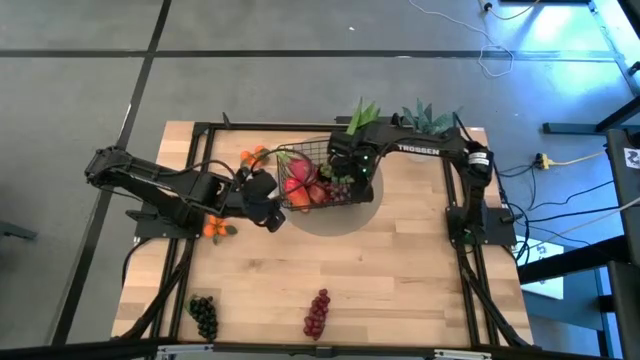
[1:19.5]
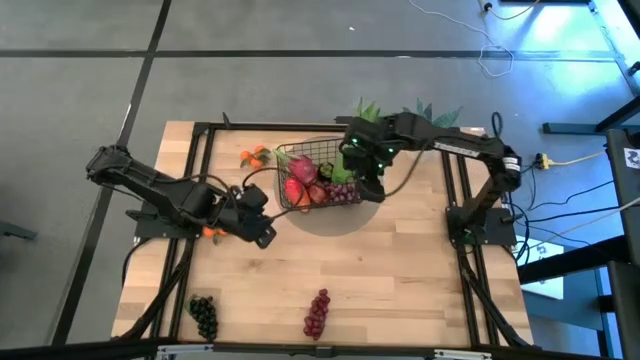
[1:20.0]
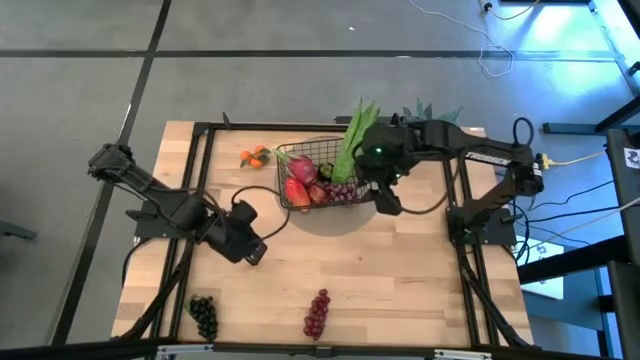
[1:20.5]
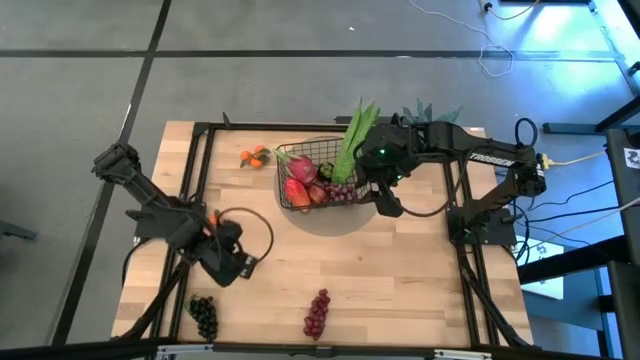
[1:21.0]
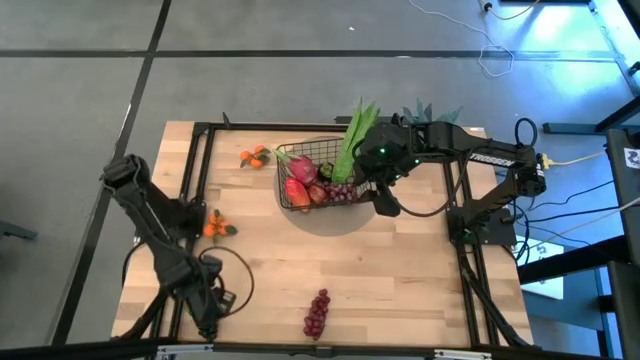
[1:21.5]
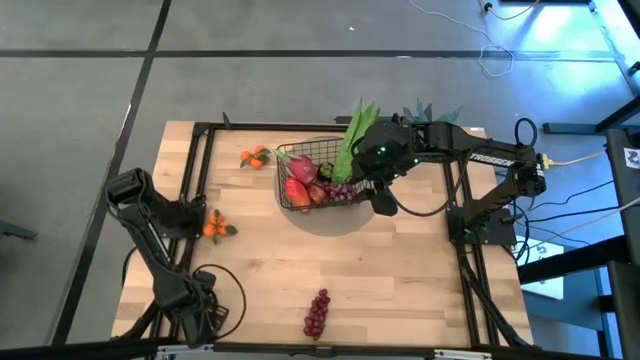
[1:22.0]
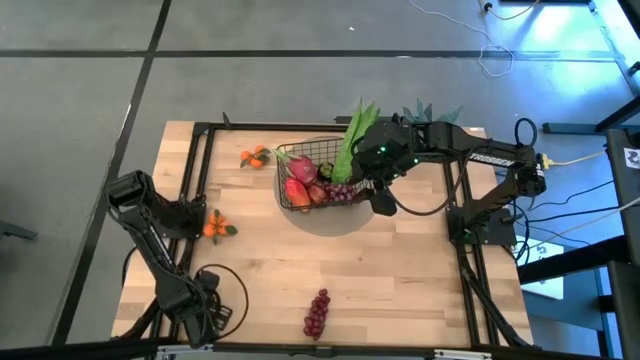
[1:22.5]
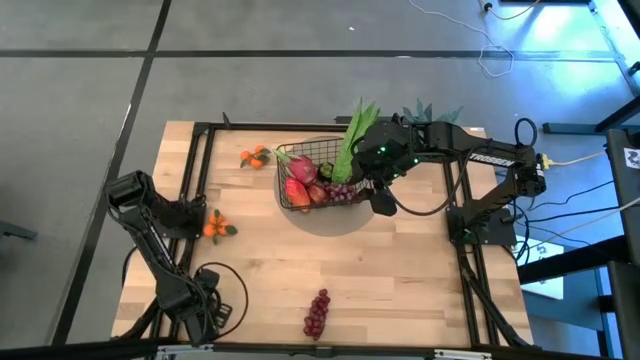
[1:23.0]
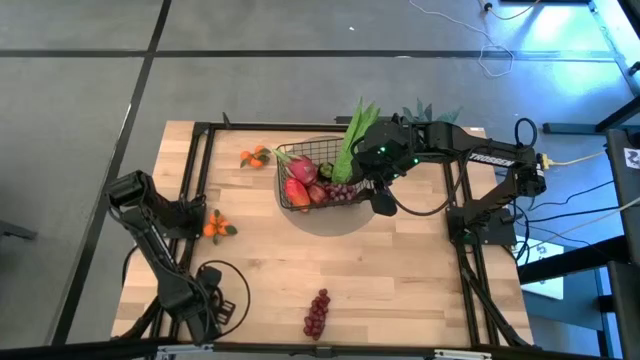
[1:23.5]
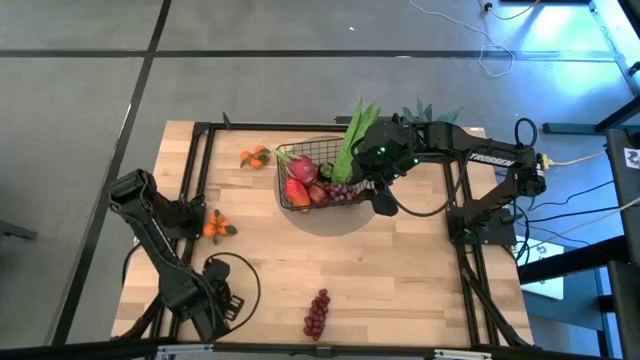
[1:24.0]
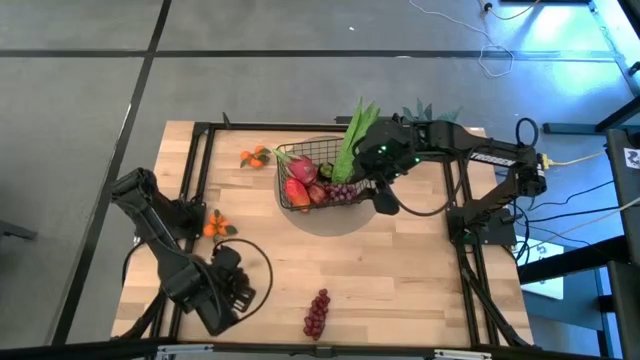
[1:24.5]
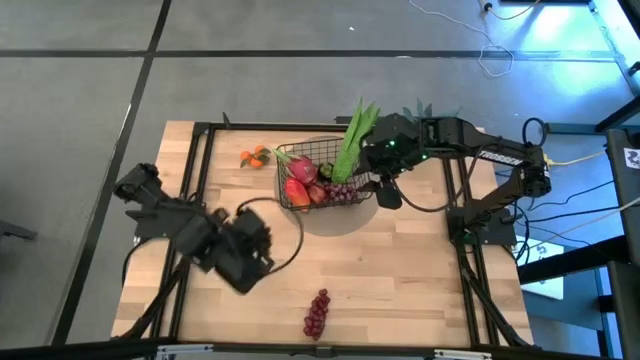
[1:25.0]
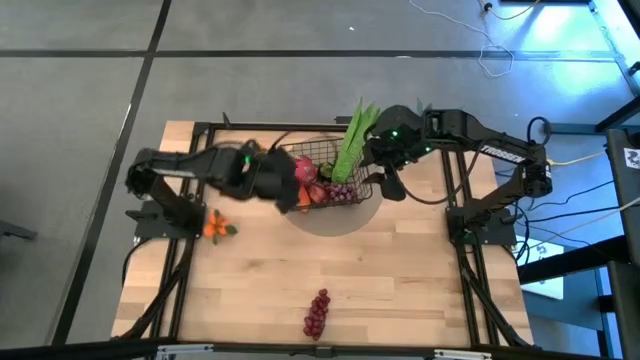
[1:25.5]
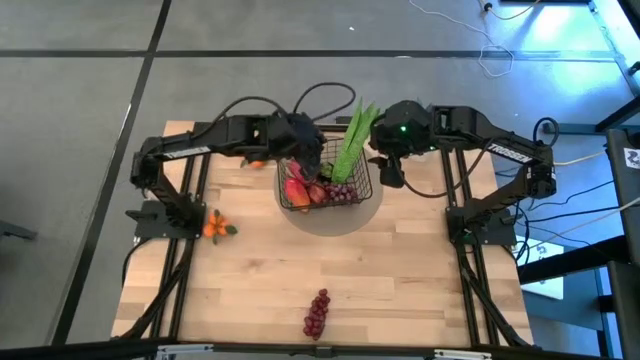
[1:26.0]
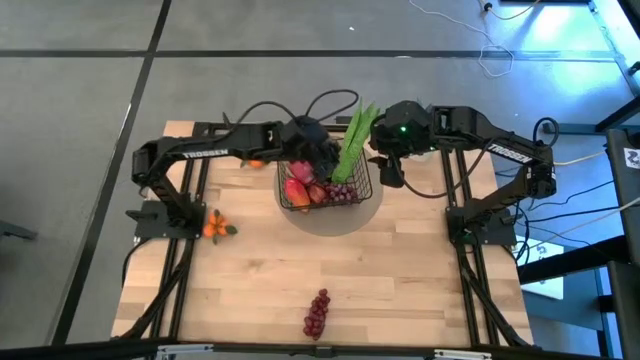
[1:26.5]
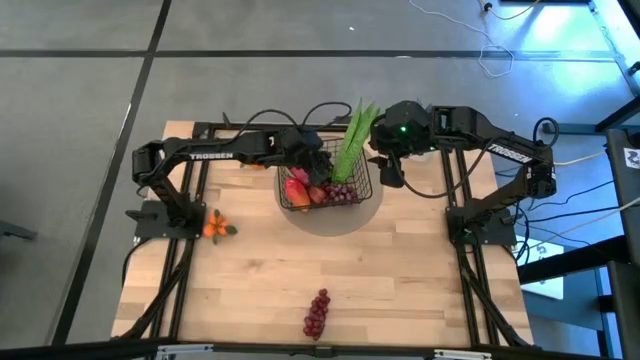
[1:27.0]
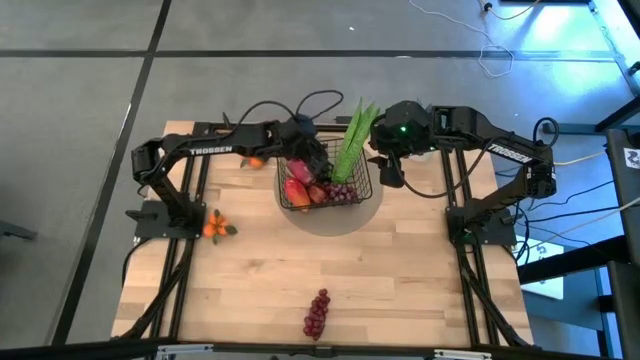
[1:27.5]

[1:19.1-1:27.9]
Task: Build produce basket
Put the purple grapes into the wire basket

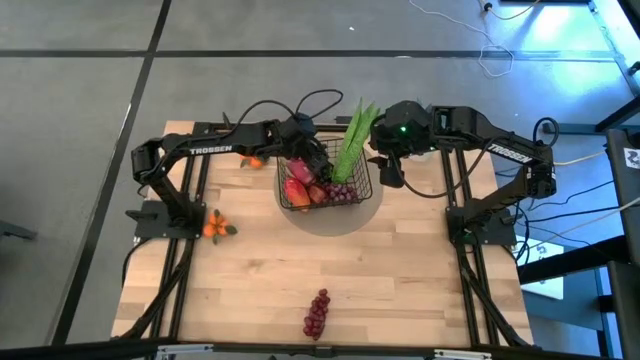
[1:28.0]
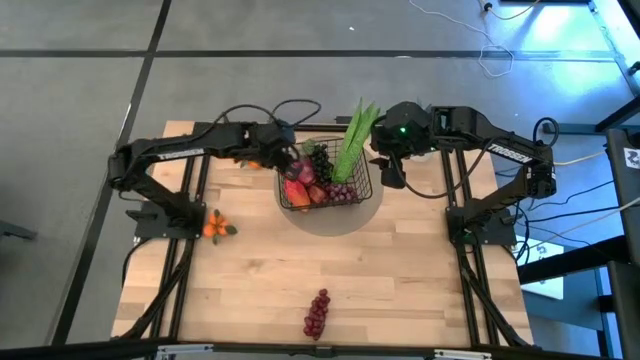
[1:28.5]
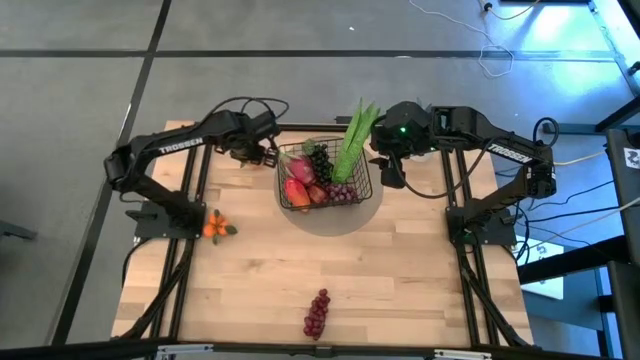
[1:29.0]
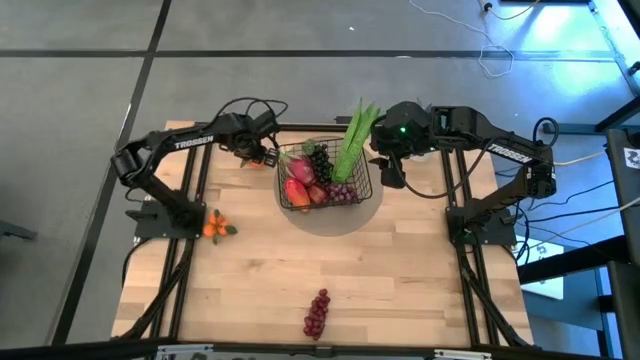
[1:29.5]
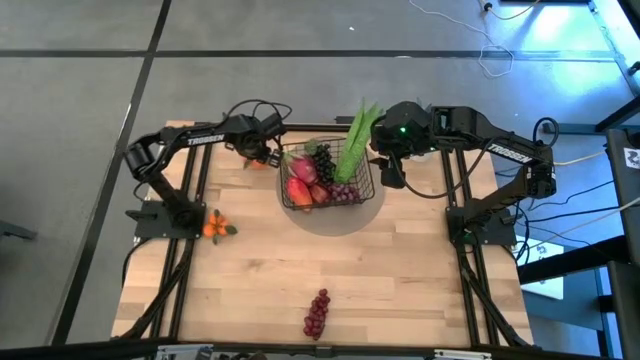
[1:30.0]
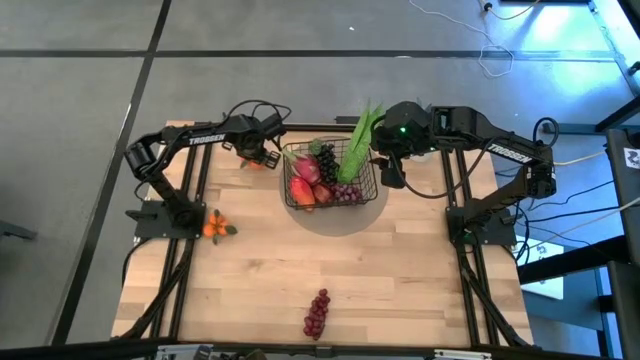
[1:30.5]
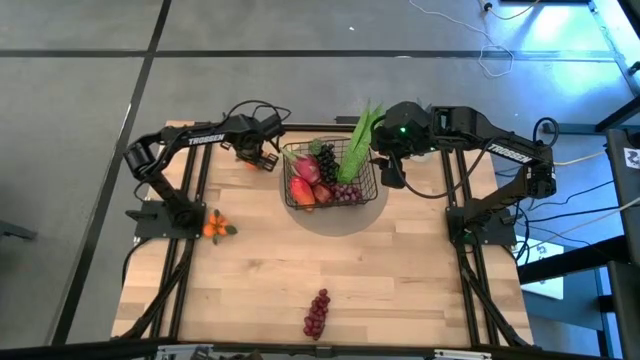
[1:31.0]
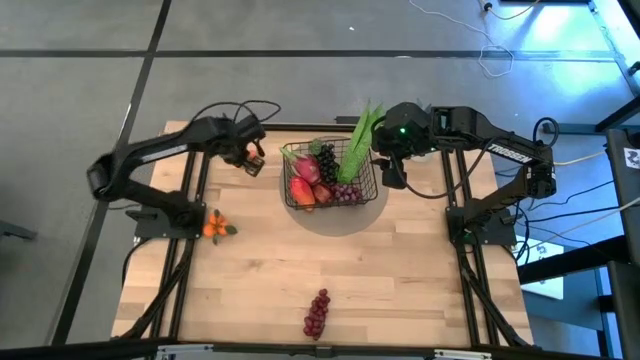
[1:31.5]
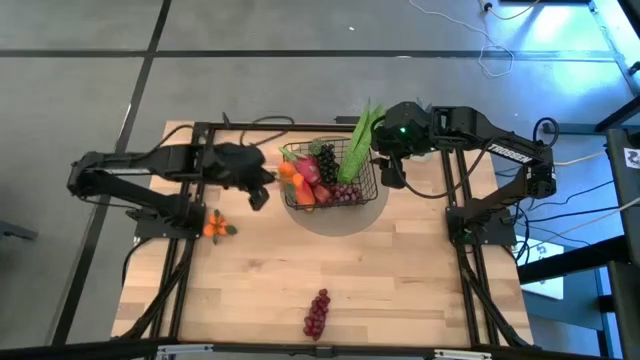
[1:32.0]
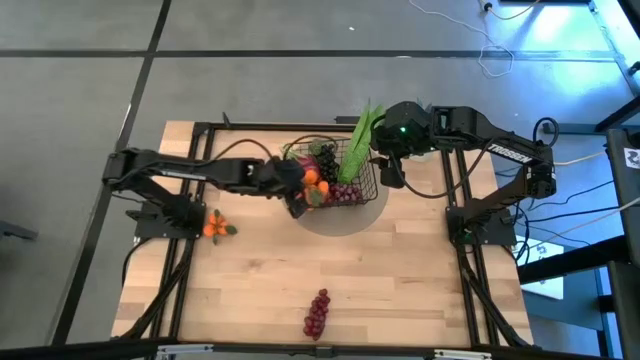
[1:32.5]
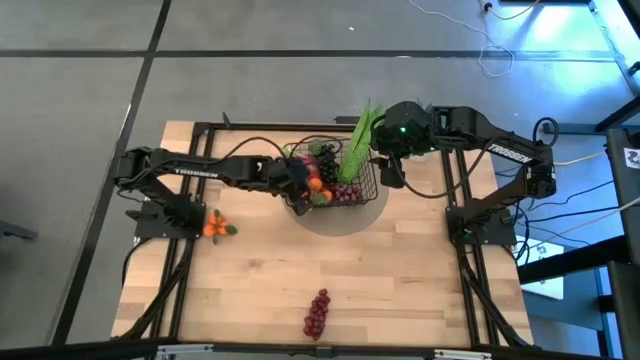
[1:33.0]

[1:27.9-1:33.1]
Put the top orange into the wire basket

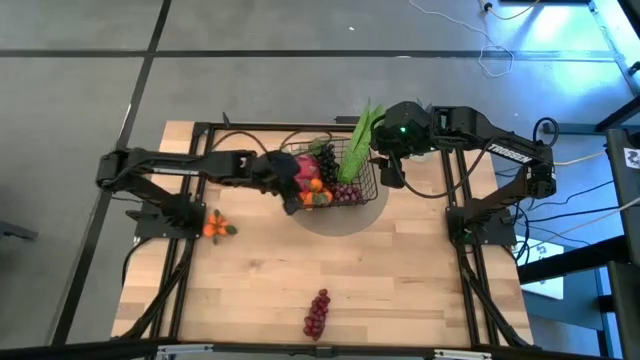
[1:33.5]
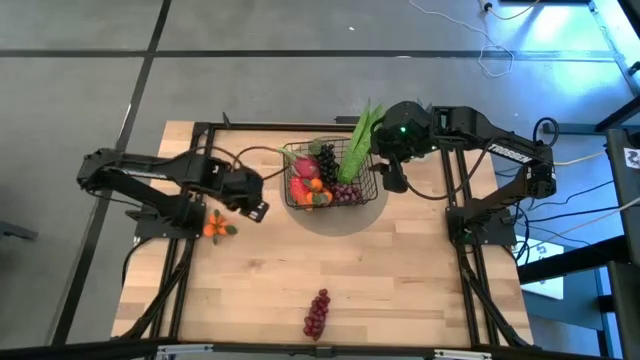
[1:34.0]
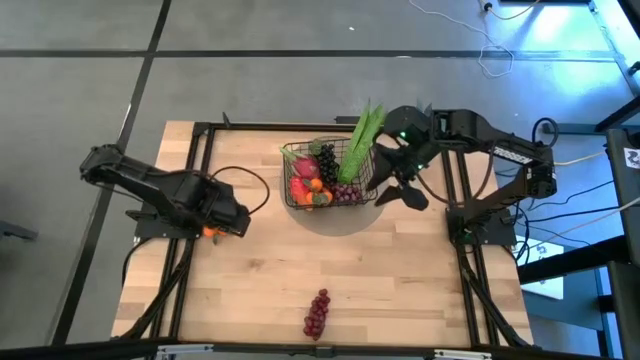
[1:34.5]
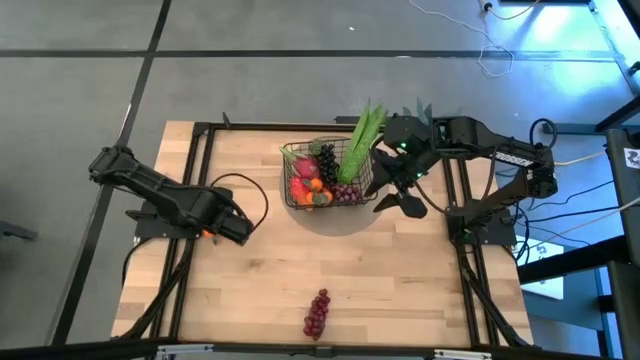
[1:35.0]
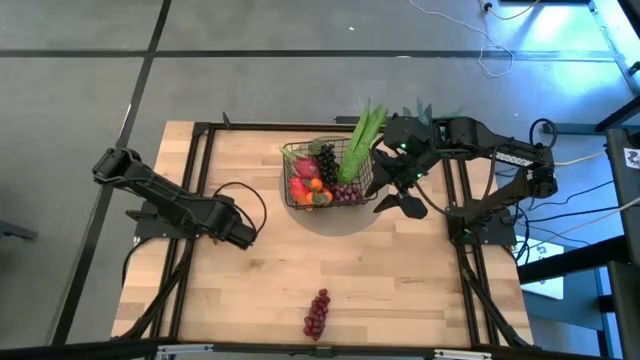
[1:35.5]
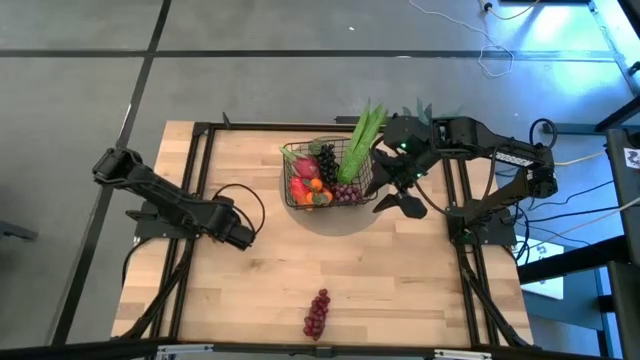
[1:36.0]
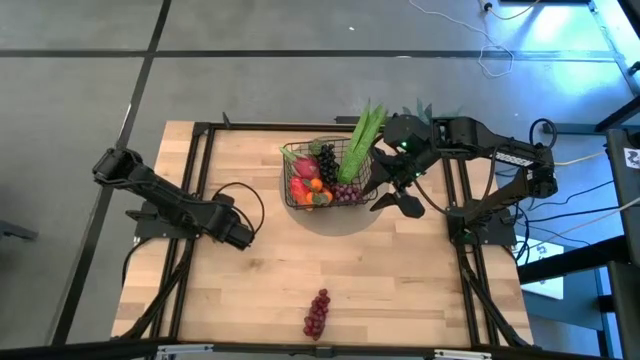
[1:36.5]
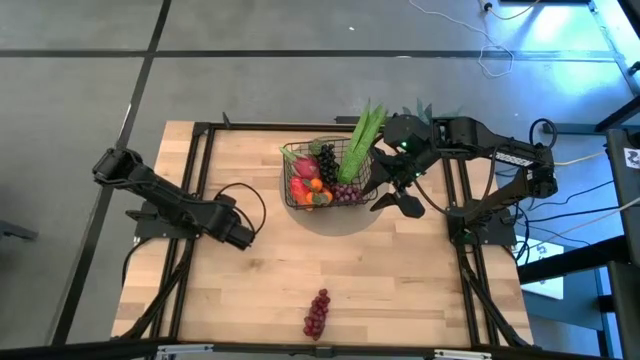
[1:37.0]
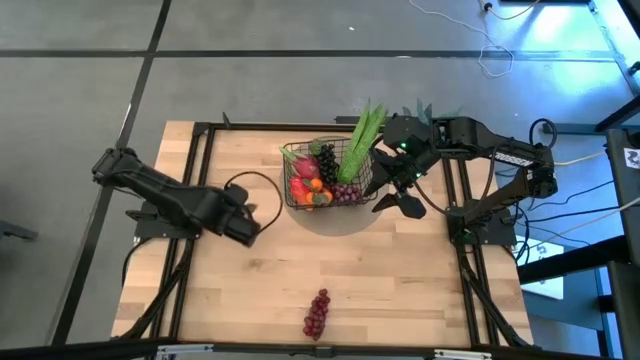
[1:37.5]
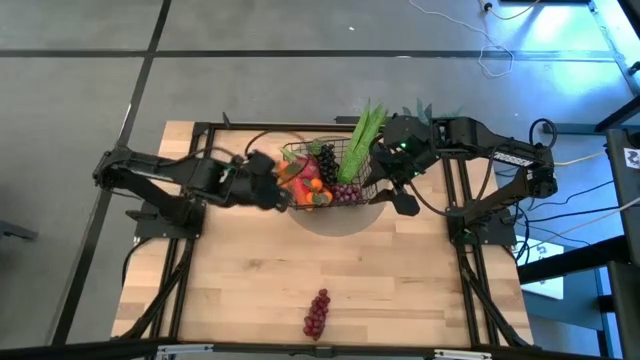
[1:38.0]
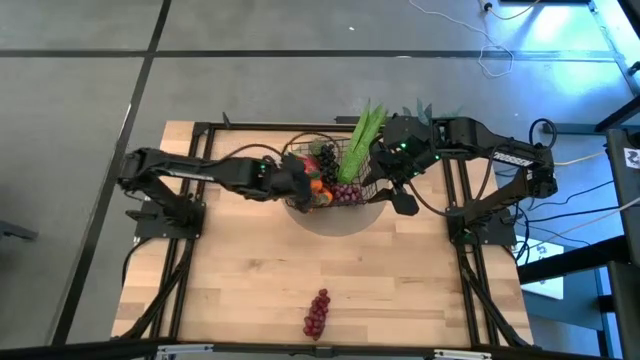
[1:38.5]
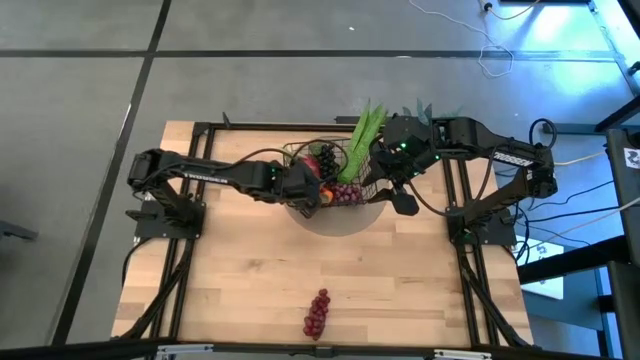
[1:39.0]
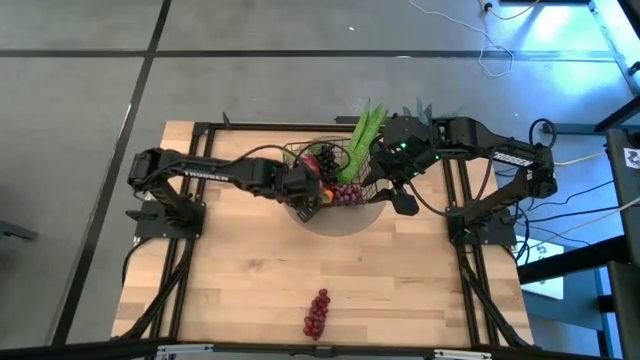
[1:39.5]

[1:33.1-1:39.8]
Put the orange into the wire basket

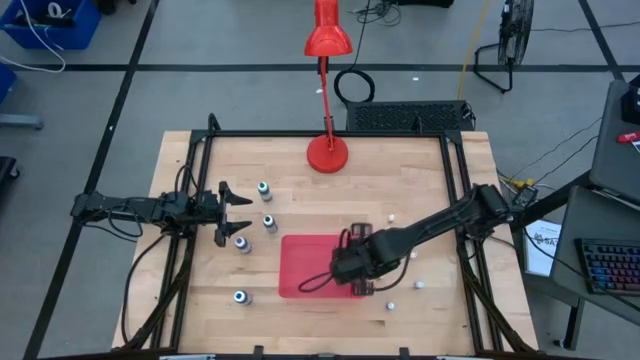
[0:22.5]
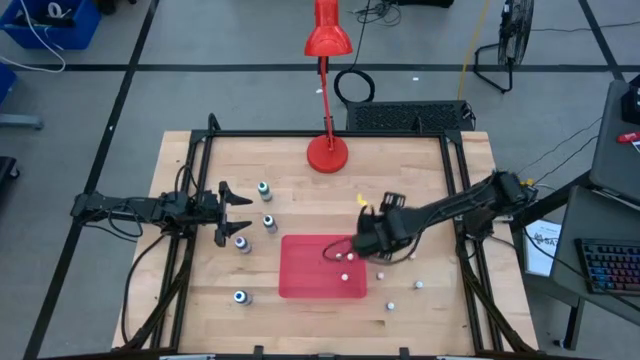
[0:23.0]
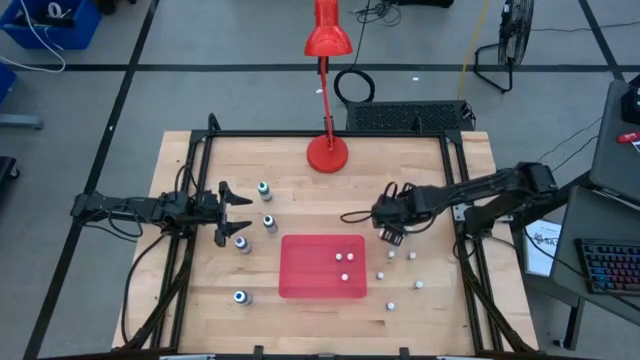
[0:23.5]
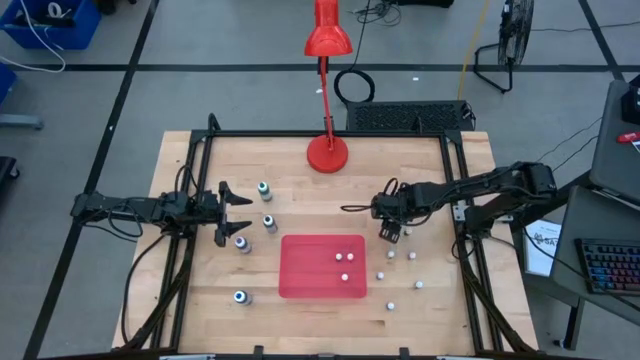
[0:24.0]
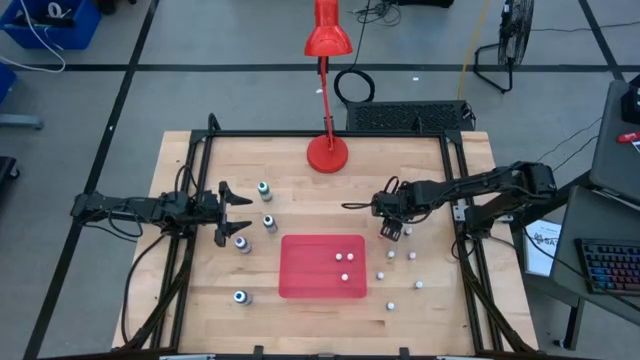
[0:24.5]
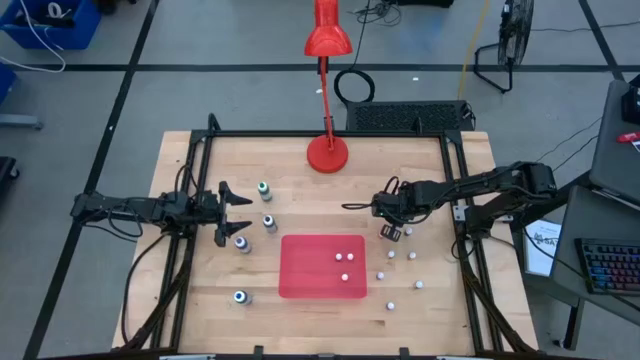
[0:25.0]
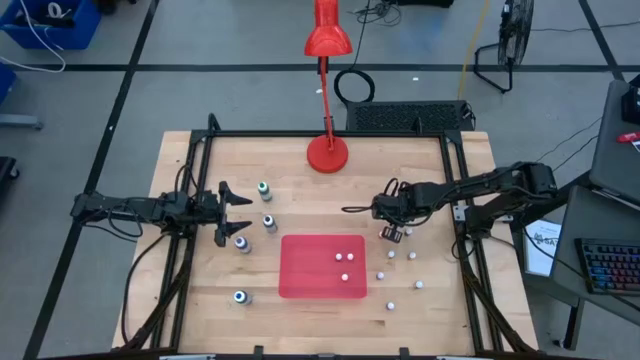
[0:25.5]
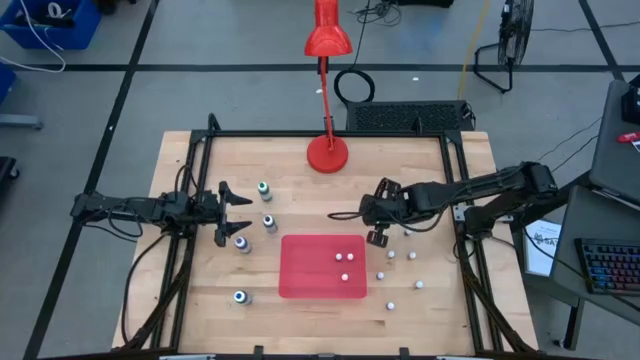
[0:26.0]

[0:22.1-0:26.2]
Task: Pick & Place food coloring
Put the small yellow food coloring bottle into the pink container
